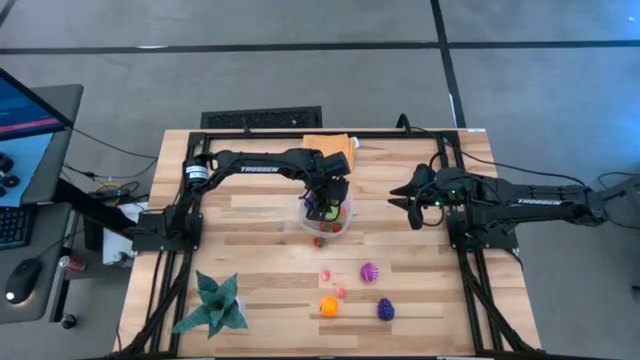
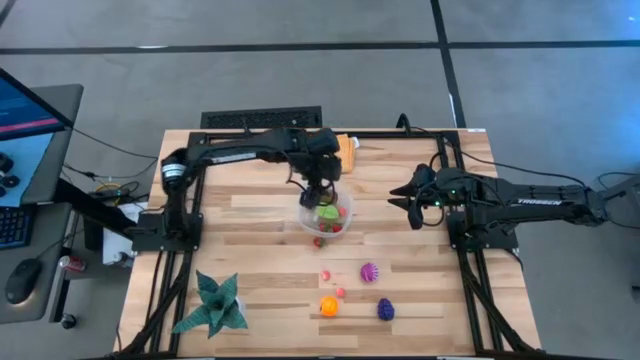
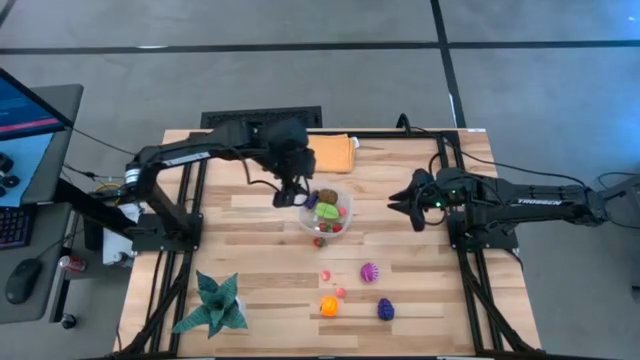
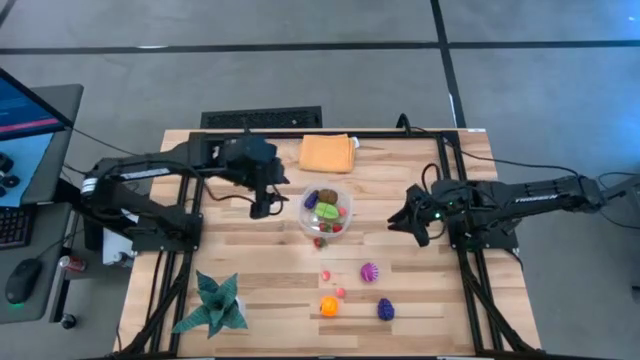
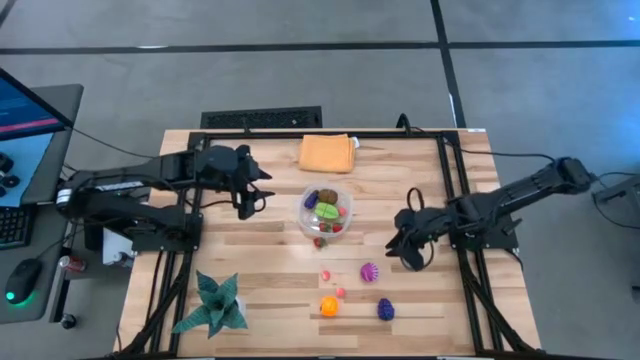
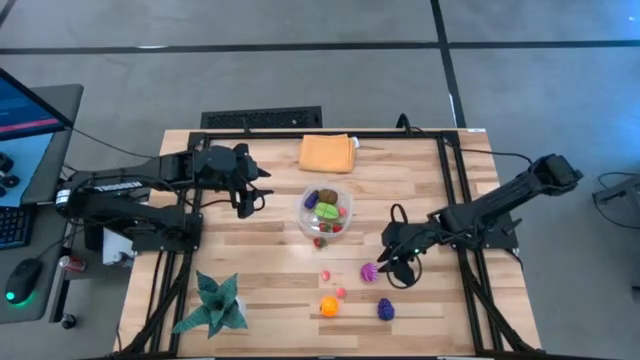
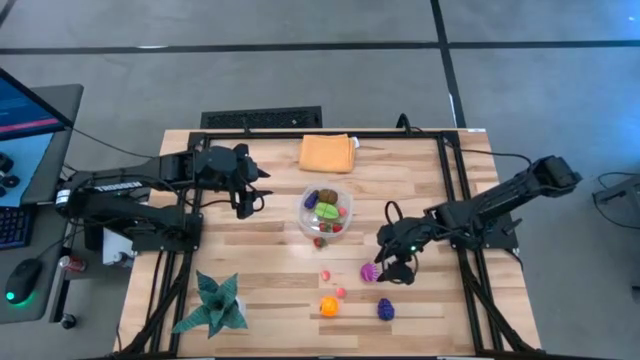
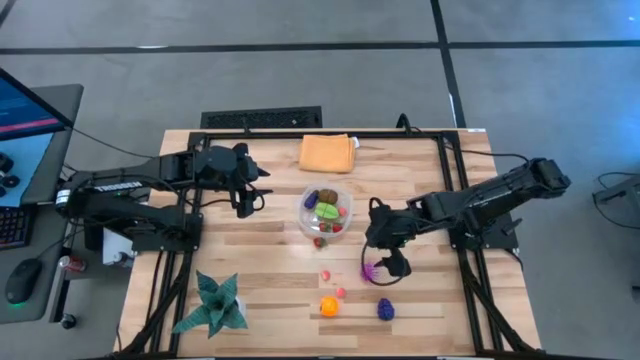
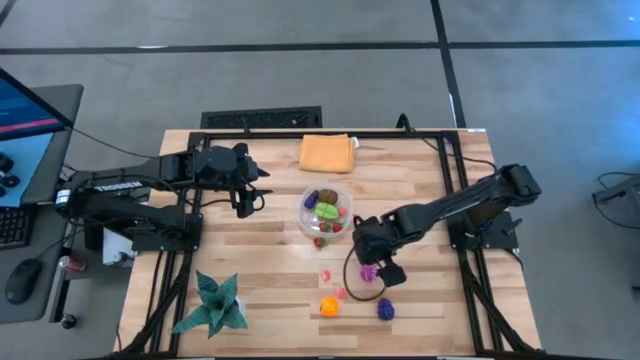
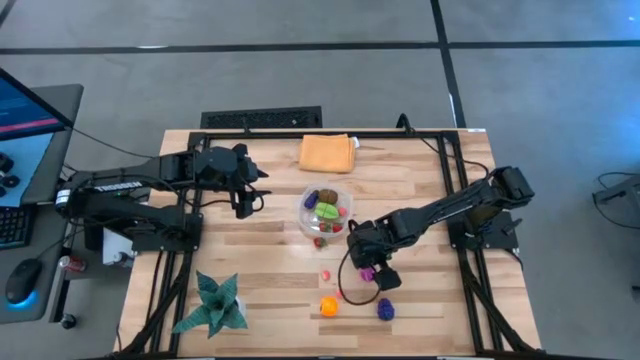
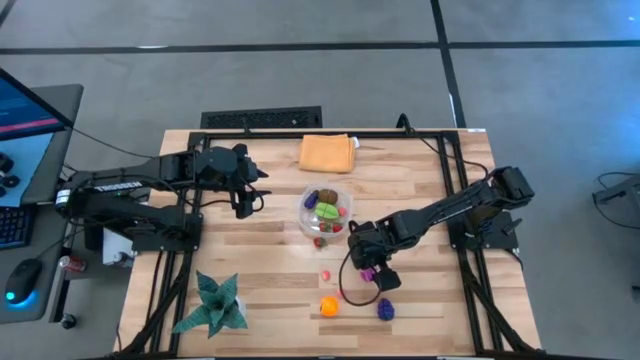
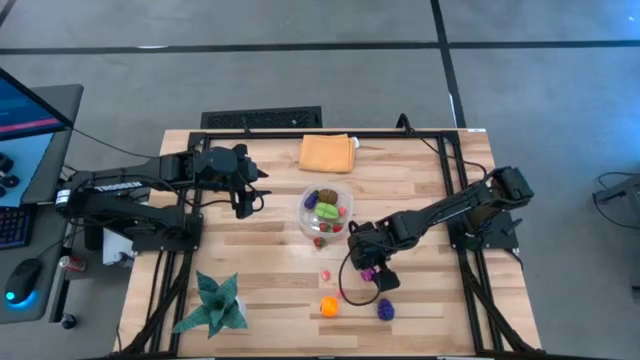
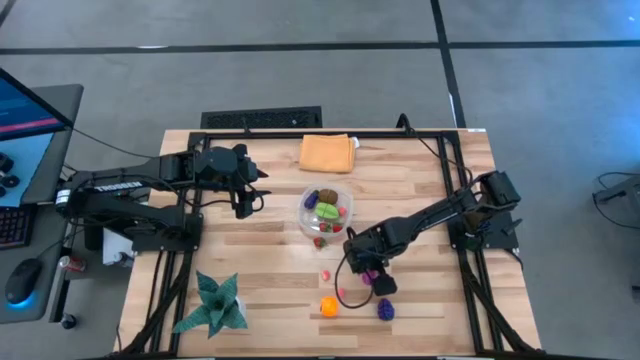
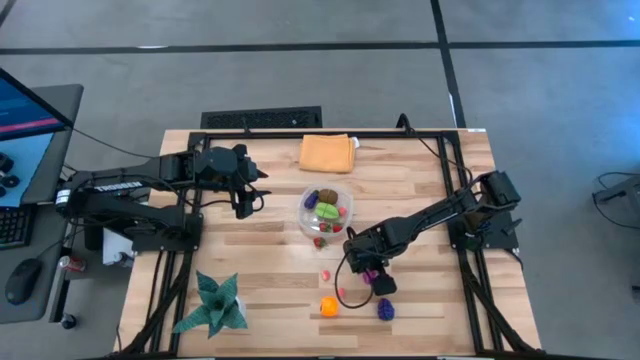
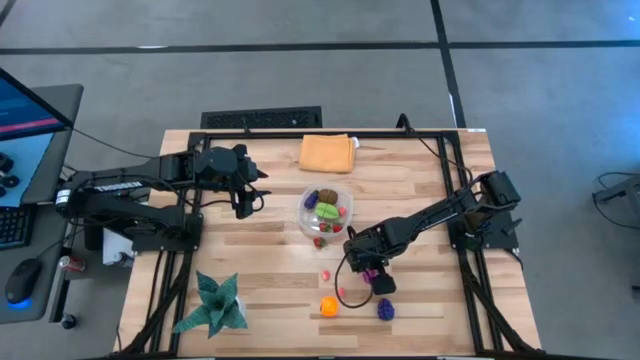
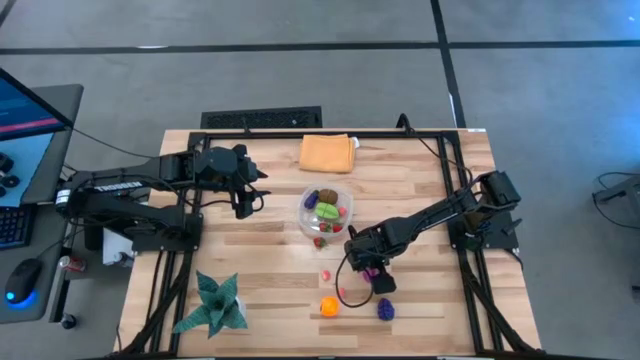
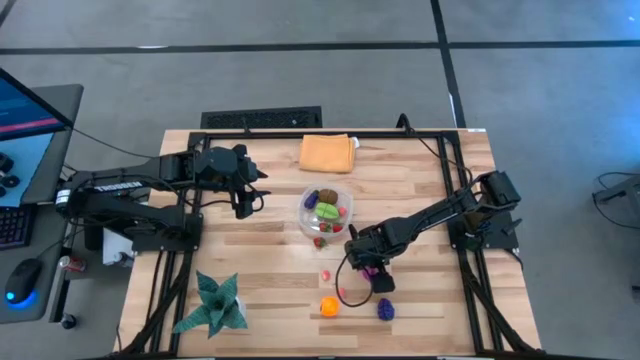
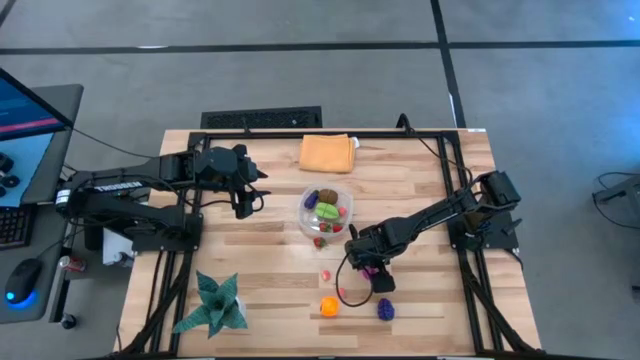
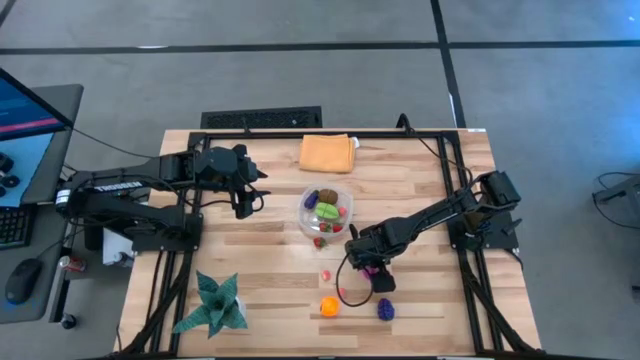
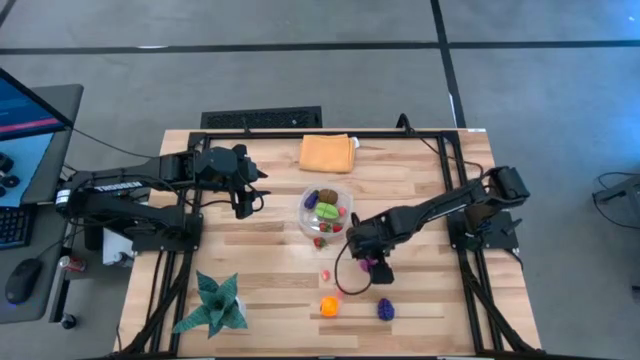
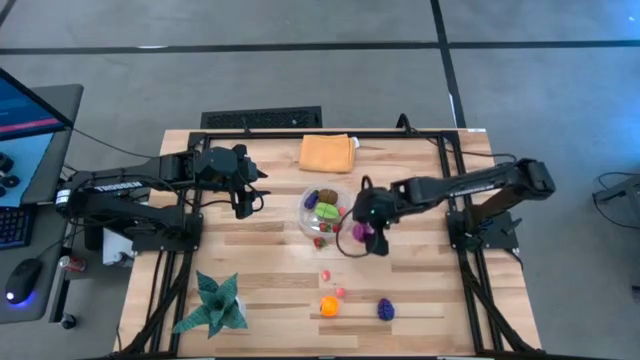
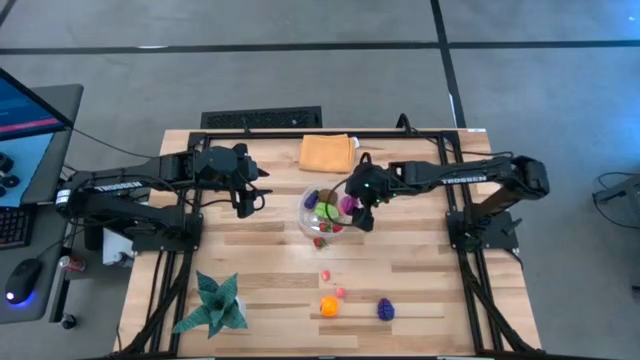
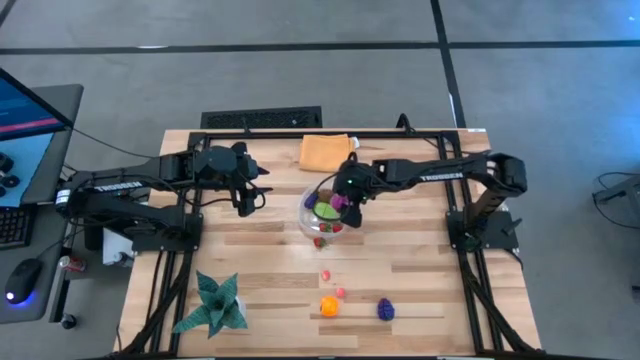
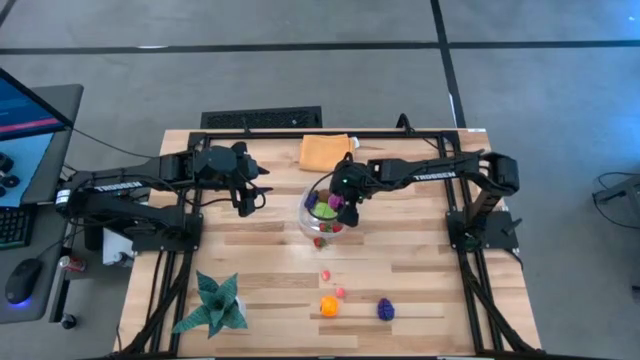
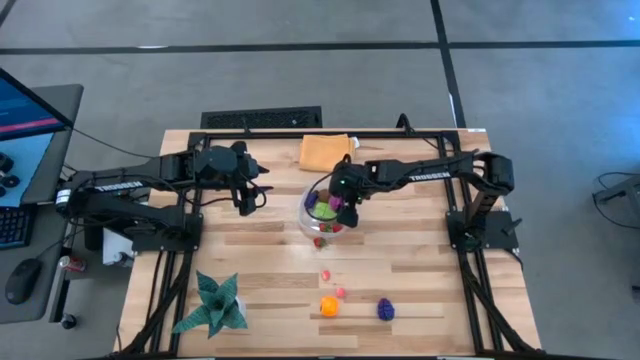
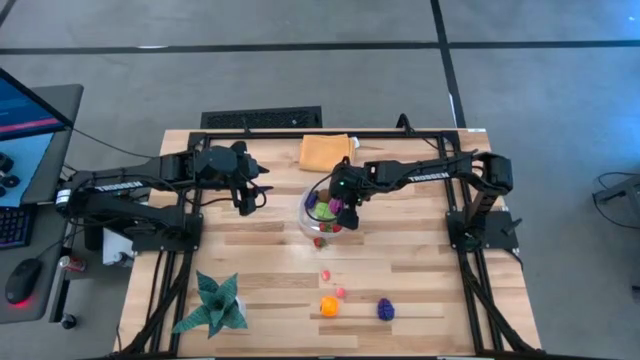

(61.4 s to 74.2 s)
Task: Pick and placing Produce into tupperware
Put the purple onion into the transparent container

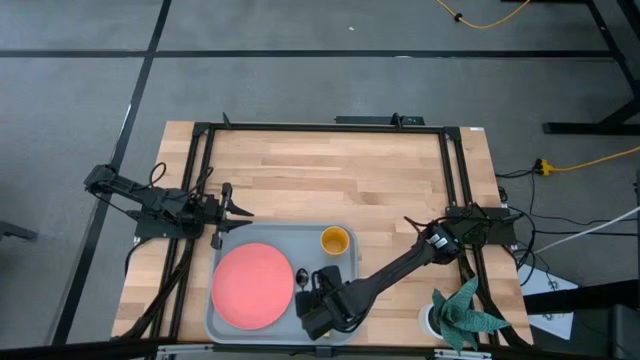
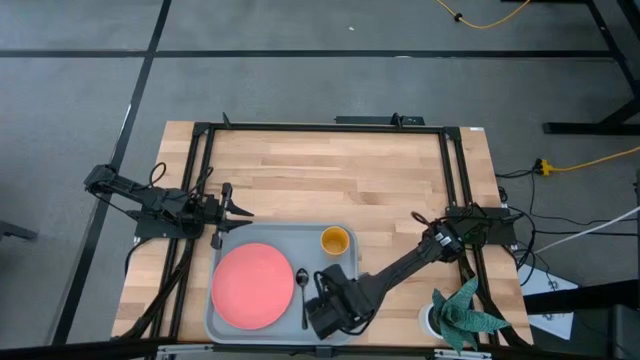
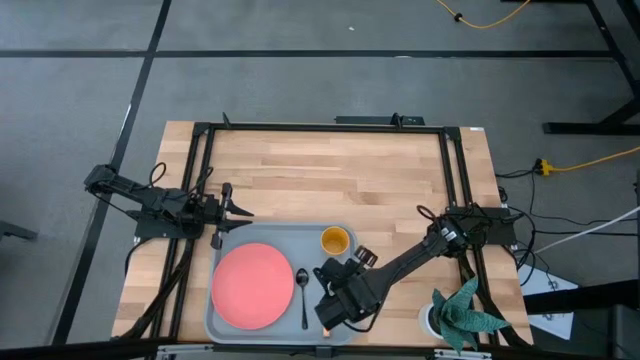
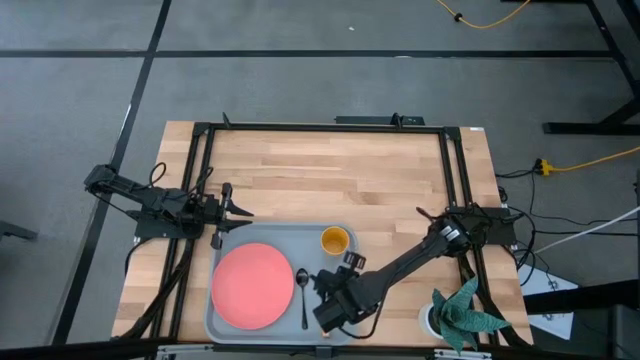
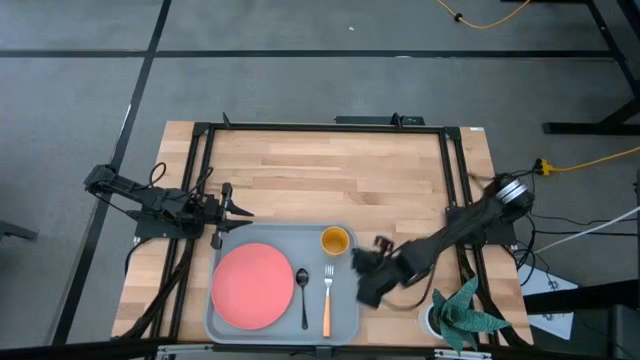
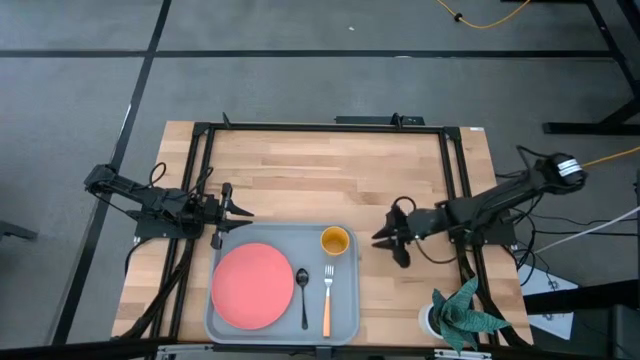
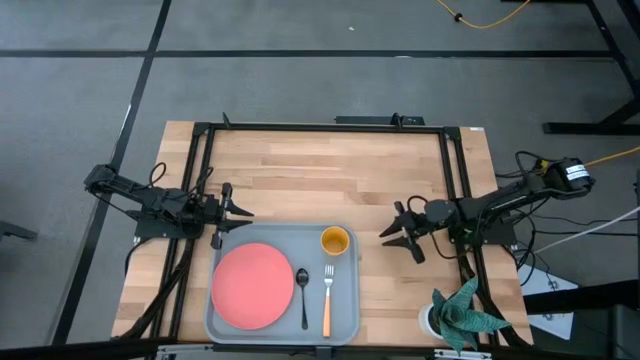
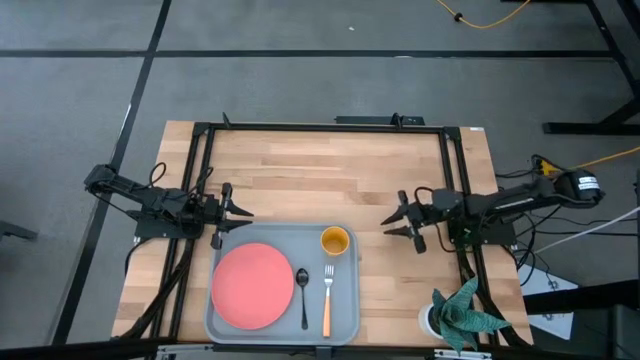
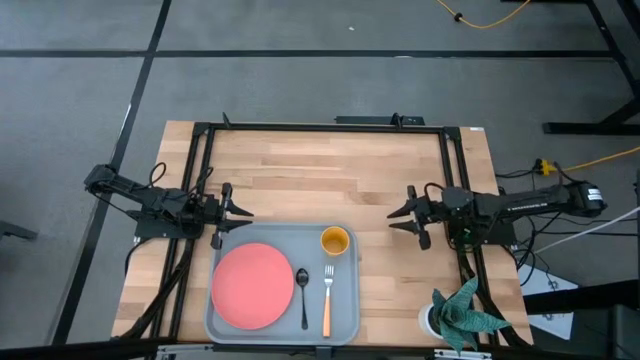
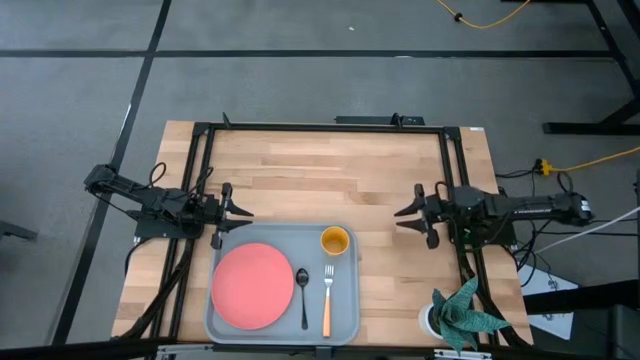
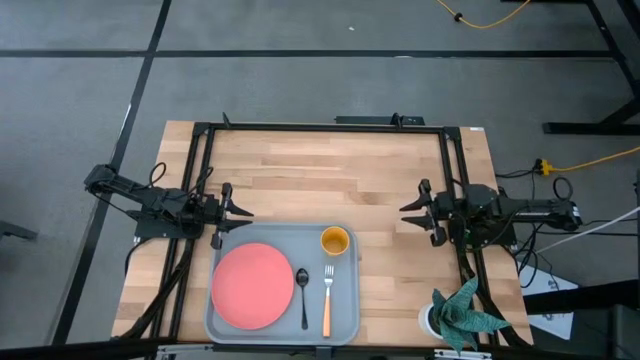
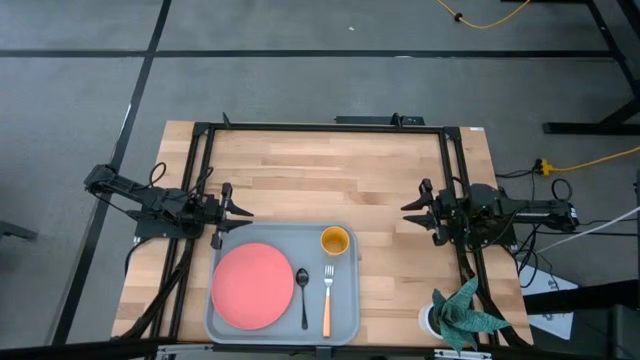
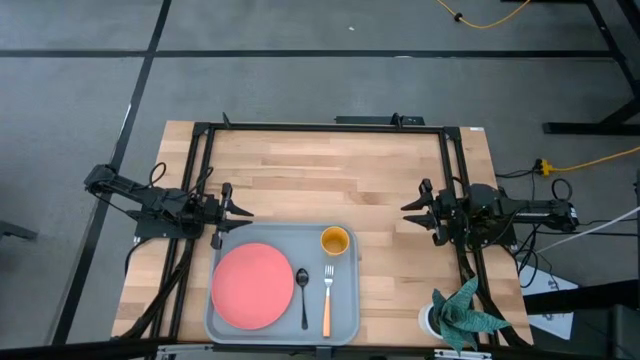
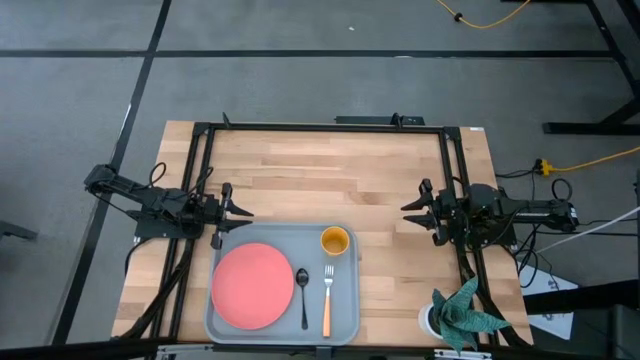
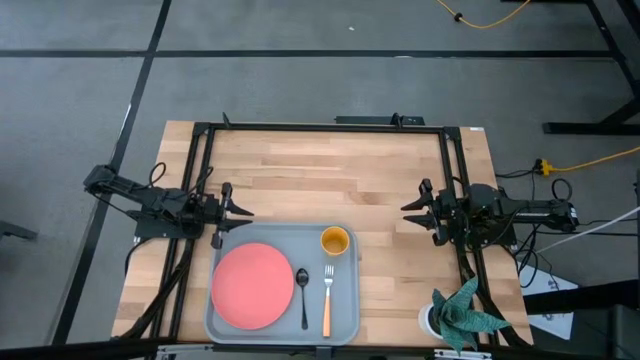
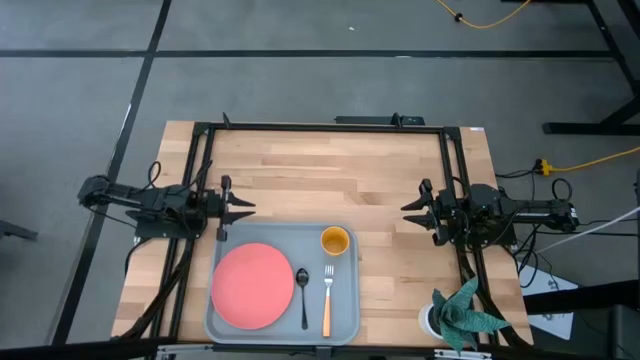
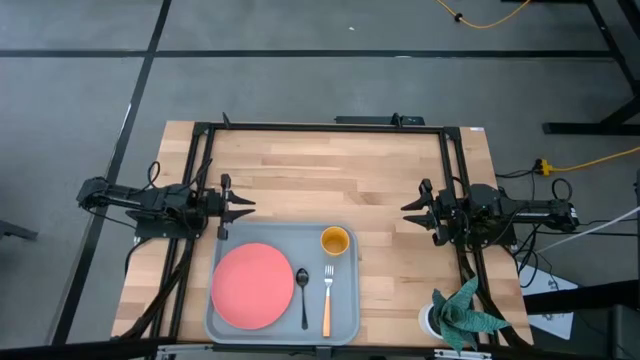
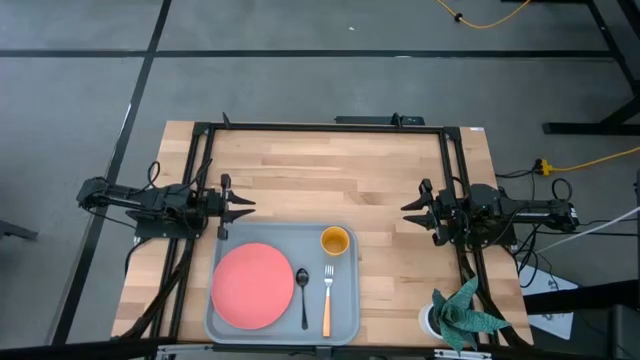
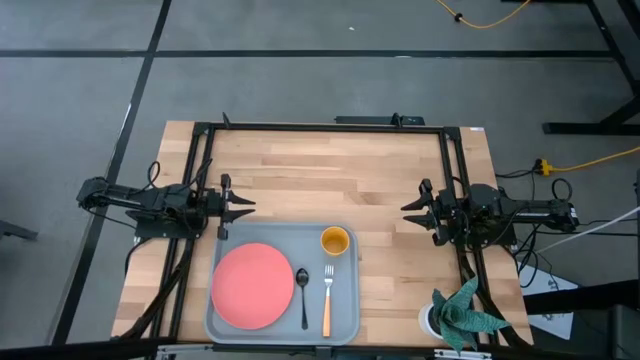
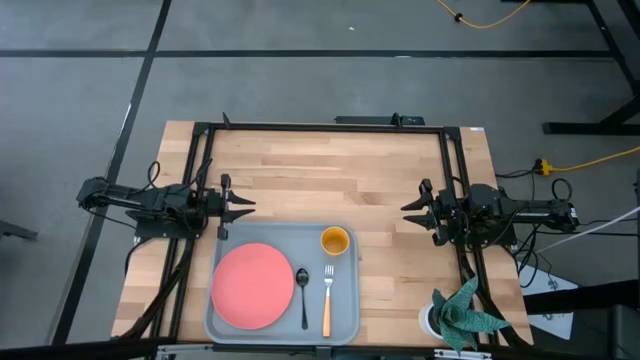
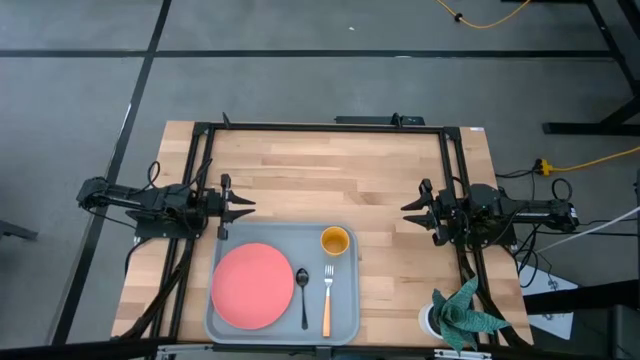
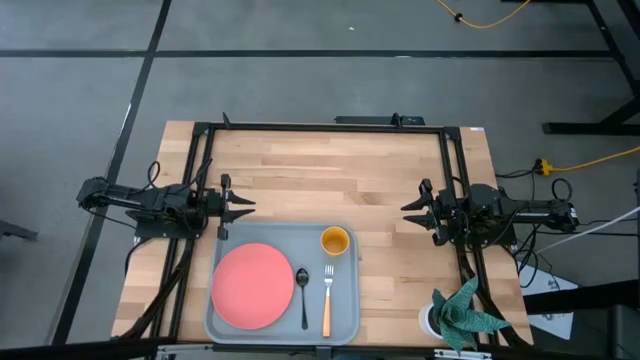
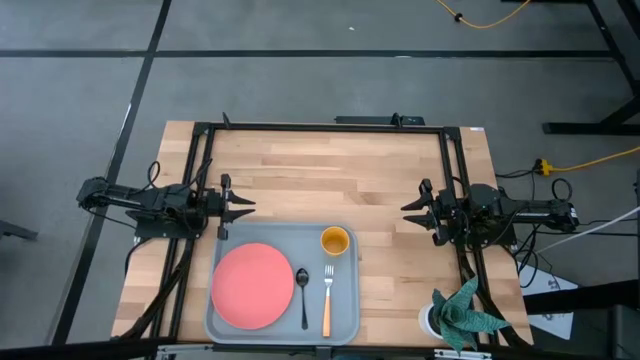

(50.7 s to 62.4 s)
Task: Pick and place plate/cup/fork/spoon on tray
Return to Home Position
